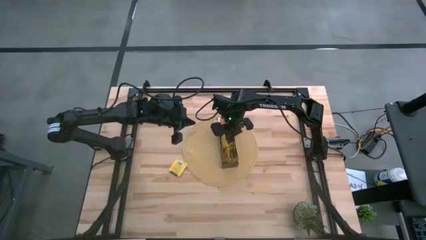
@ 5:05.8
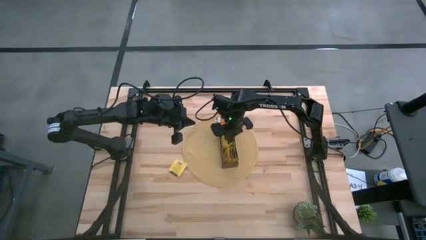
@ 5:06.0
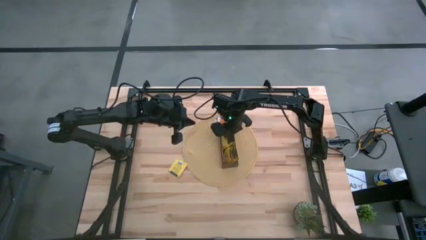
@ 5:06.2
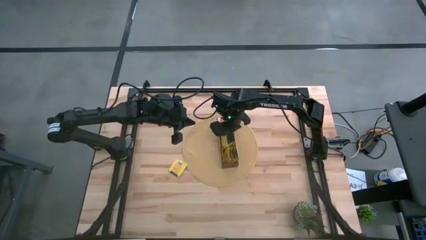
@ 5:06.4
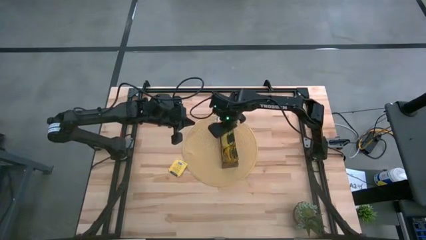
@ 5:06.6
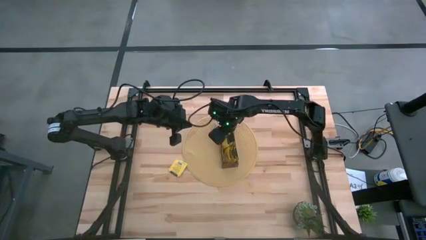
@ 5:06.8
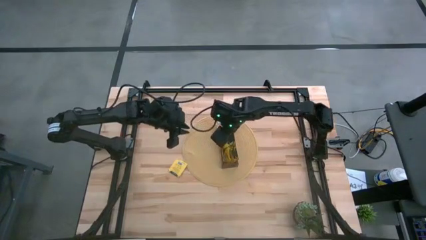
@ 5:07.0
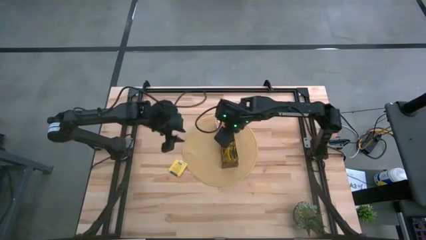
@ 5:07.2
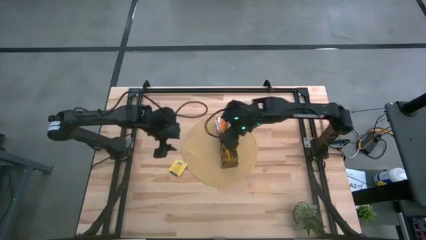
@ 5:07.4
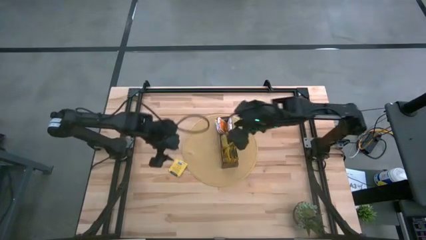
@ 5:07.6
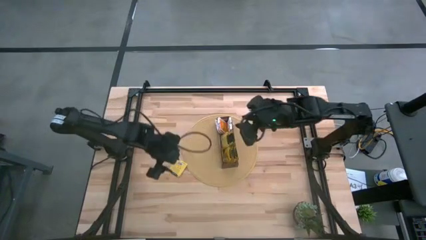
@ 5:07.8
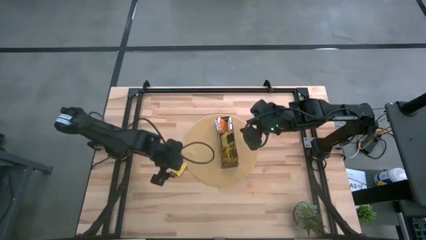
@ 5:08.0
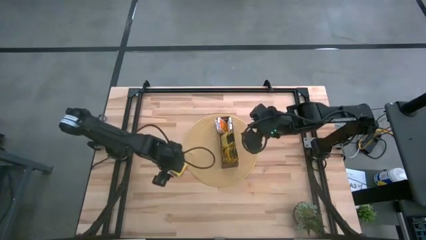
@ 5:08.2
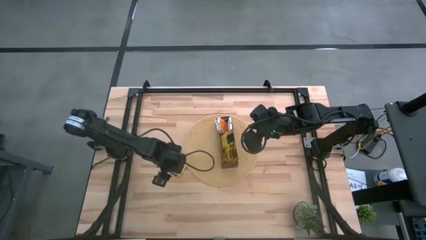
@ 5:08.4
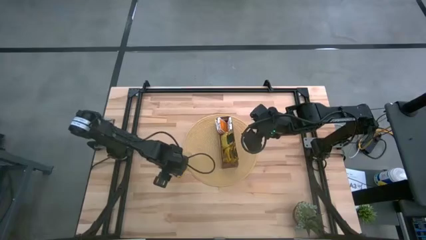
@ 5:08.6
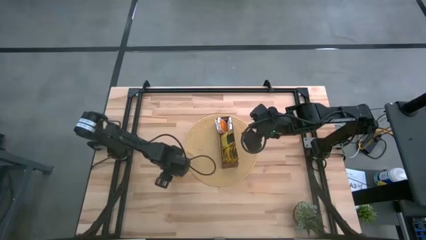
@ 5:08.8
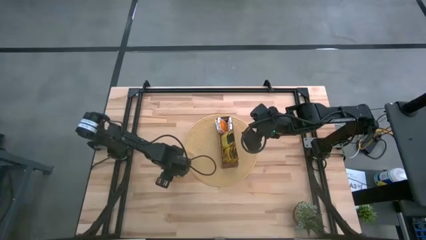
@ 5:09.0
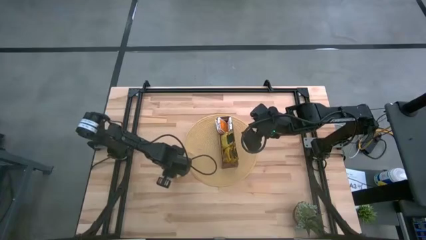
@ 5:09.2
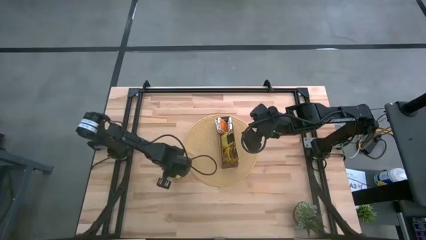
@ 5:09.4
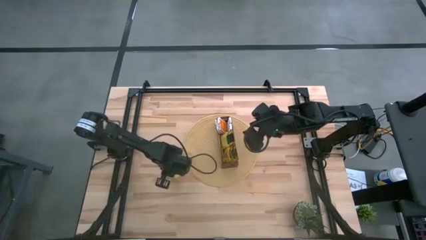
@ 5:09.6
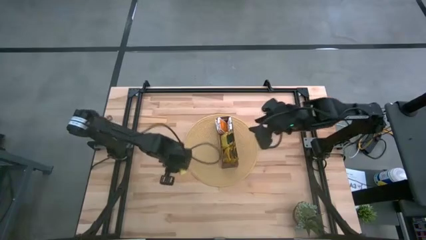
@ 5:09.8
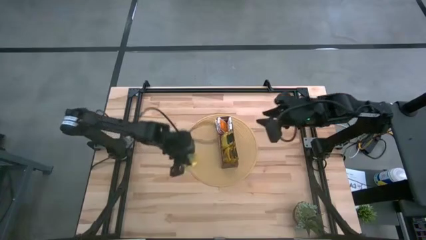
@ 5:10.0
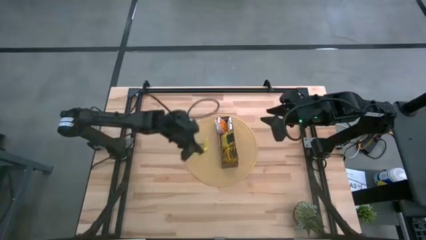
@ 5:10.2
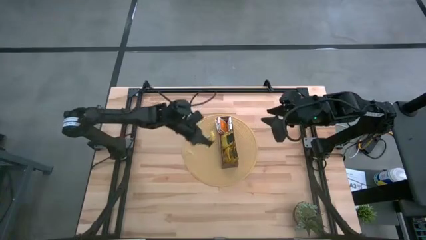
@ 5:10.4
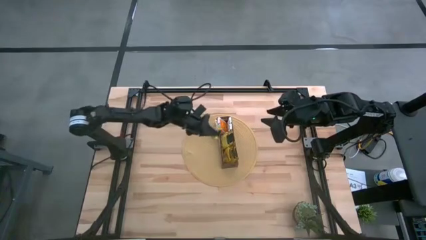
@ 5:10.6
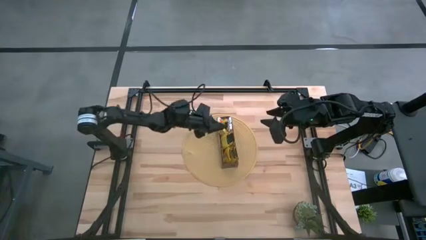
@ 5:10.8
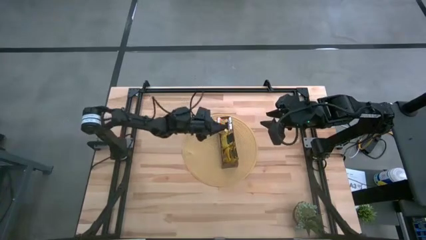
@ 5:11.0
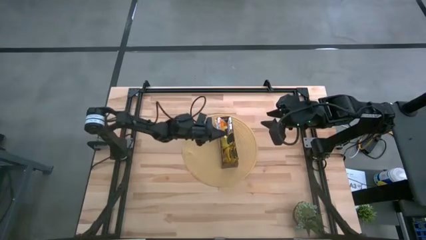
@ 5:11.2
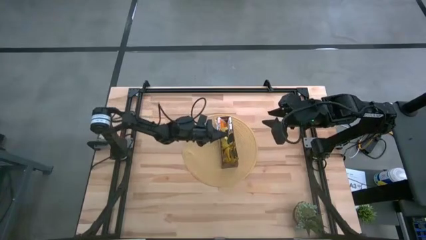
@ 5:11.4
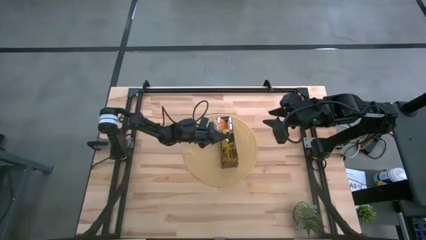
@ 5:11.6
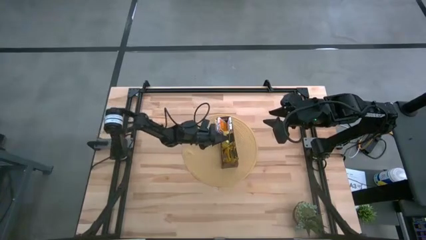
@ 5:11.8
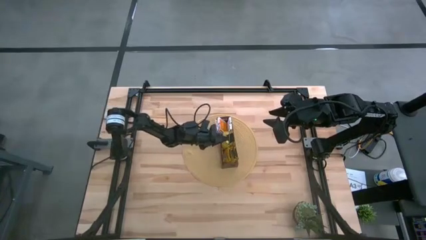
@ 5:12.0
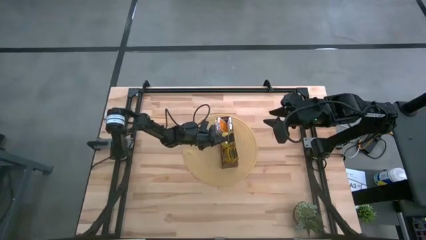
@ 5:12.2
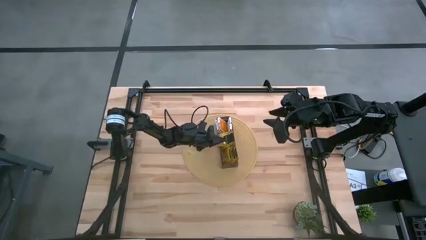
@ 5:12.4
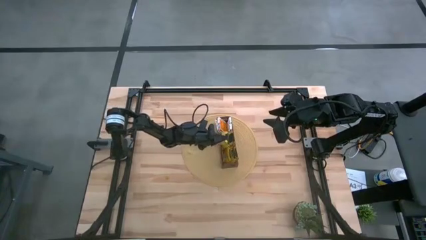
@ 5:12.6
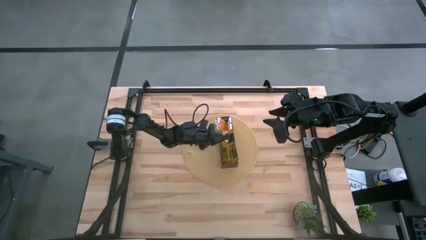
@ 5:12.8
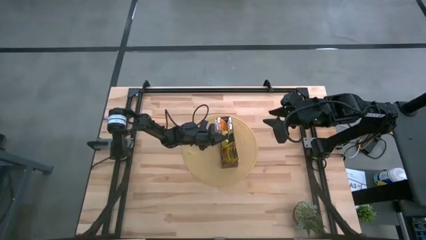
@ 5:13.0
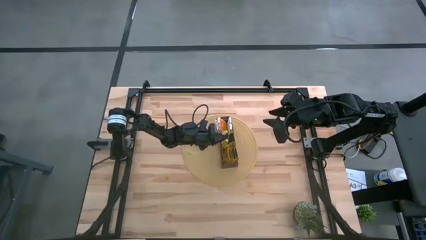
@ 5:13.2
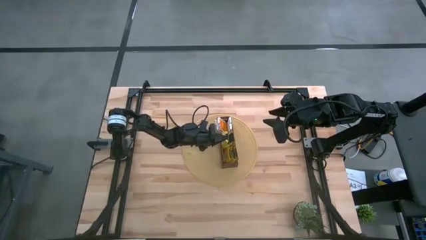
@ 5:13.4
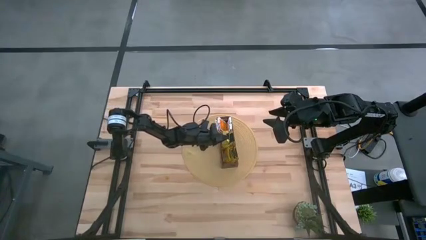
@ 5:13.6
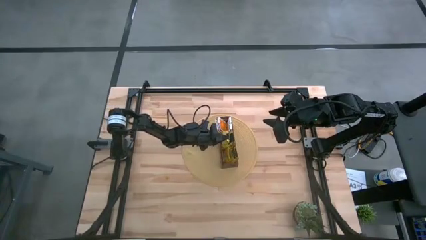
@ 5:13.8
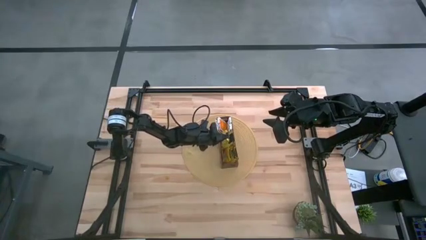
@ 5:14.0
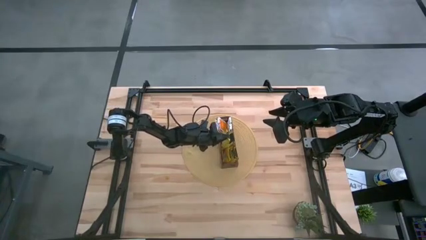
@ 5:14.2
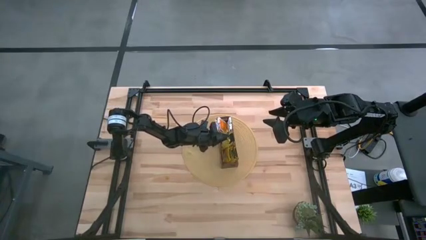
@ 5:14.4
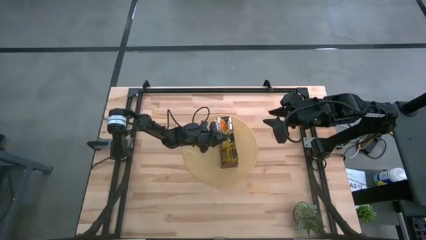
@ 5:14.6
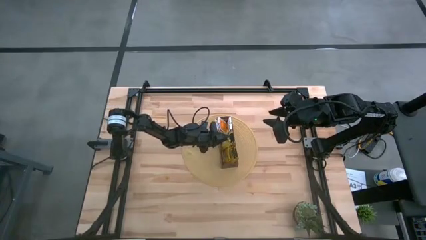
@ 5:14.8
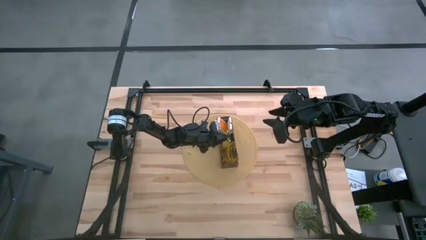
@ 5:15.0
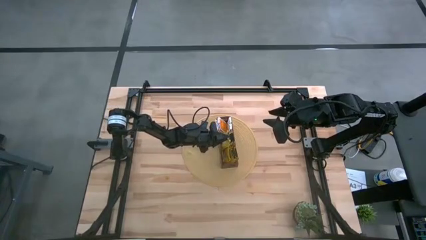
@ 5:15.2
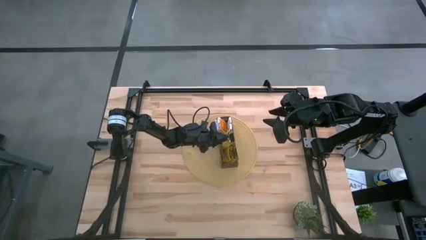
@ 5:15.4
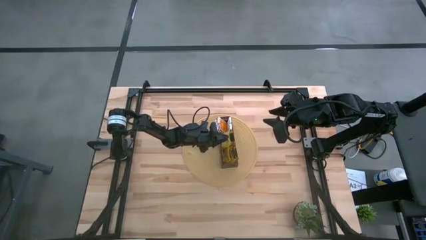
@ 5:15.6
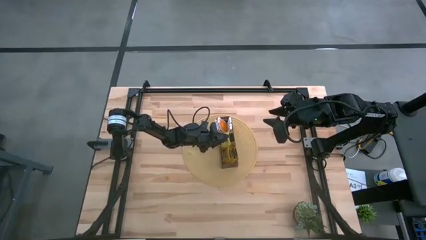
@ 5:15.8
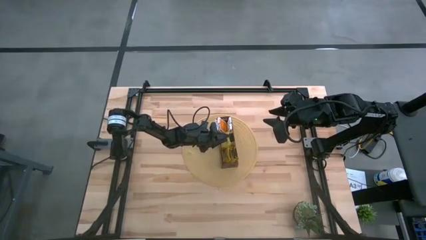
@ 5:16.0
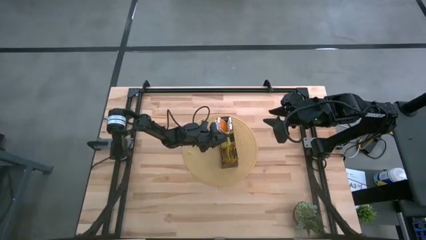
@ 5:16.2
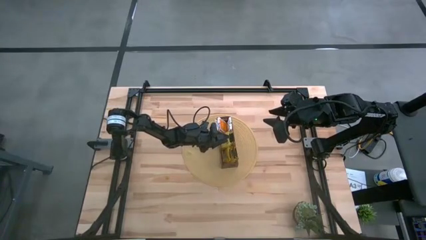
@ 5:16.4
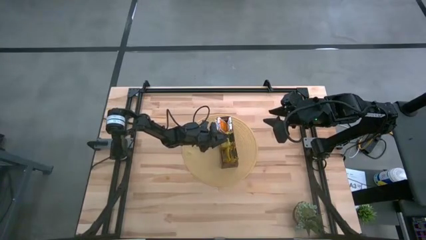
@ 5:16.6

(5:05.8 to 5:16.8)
Task: Pick & Place Tea
Put the yellow tea bag into the middle section of the wooden organizer

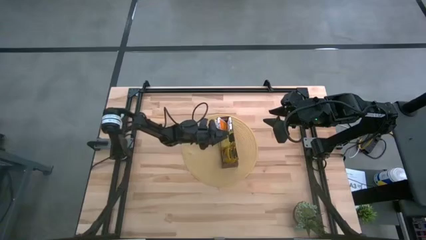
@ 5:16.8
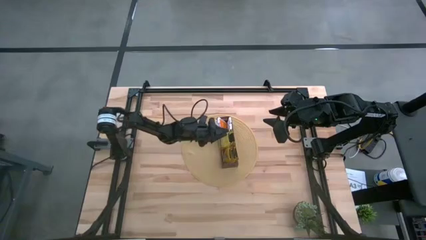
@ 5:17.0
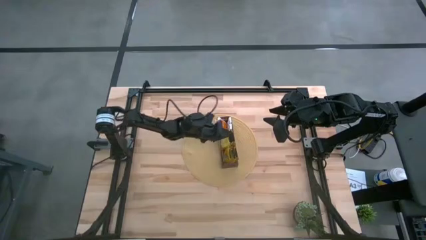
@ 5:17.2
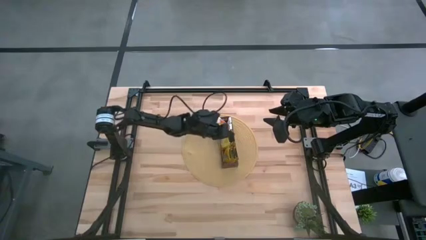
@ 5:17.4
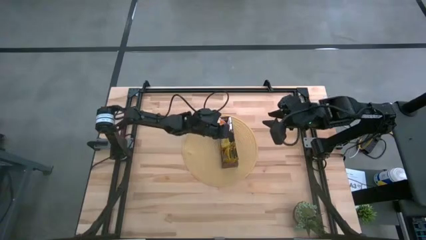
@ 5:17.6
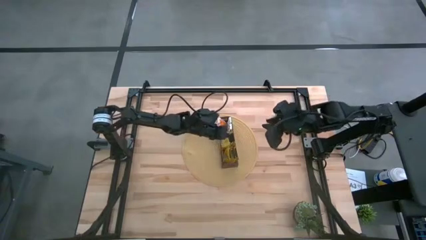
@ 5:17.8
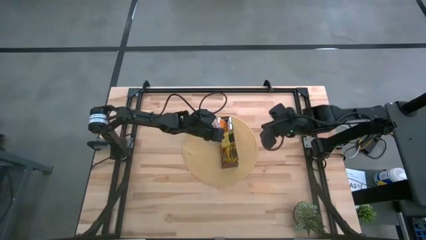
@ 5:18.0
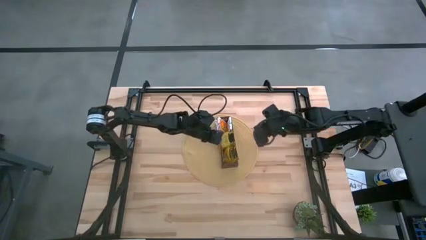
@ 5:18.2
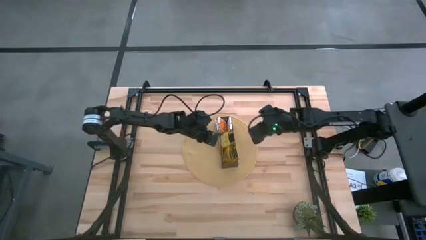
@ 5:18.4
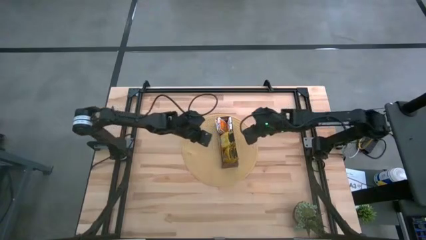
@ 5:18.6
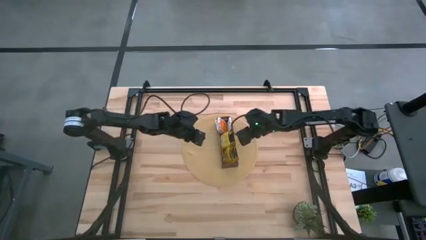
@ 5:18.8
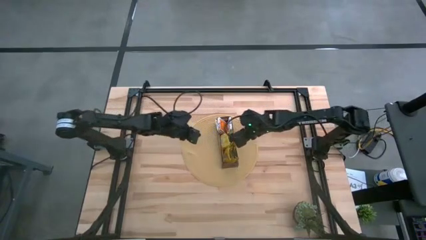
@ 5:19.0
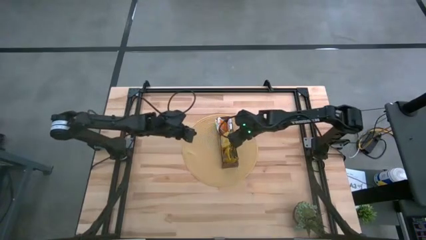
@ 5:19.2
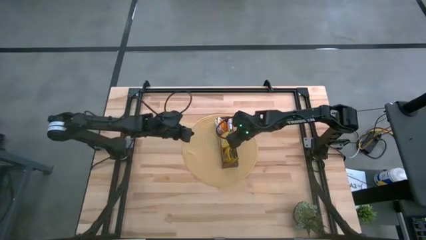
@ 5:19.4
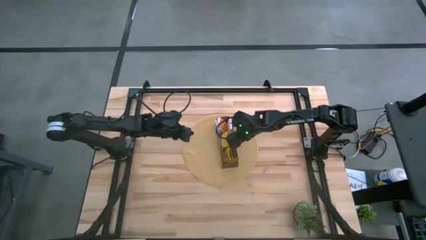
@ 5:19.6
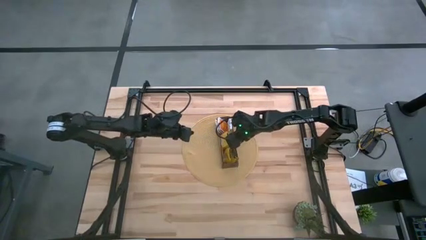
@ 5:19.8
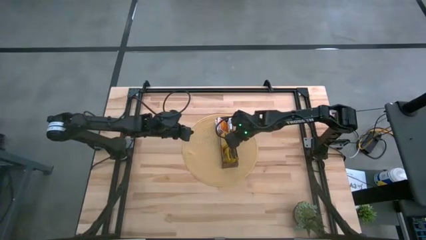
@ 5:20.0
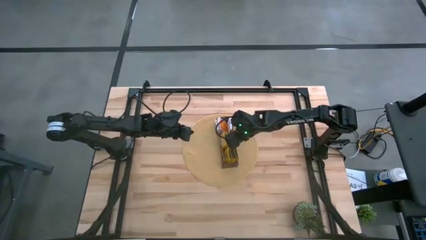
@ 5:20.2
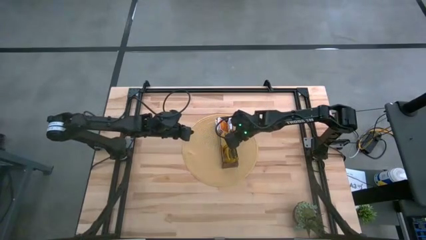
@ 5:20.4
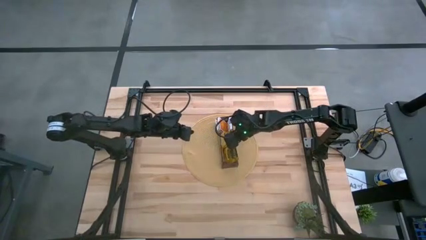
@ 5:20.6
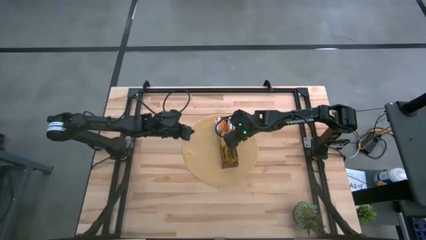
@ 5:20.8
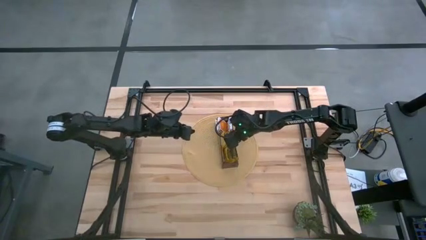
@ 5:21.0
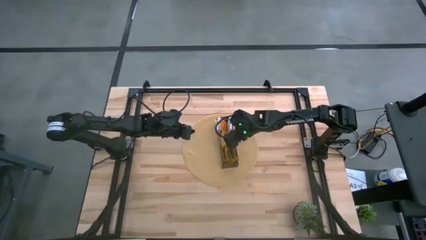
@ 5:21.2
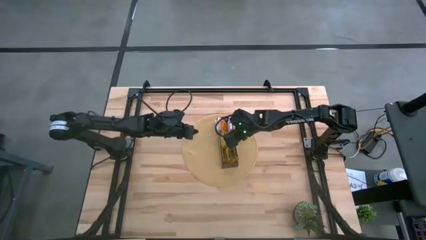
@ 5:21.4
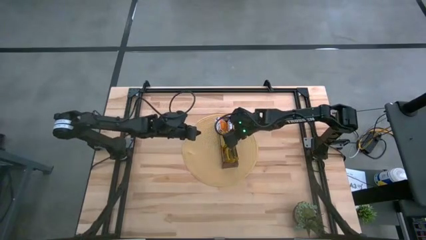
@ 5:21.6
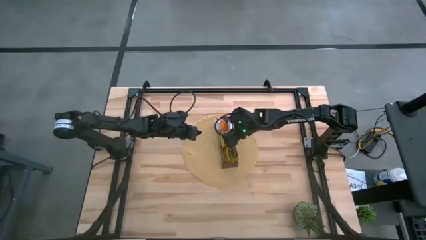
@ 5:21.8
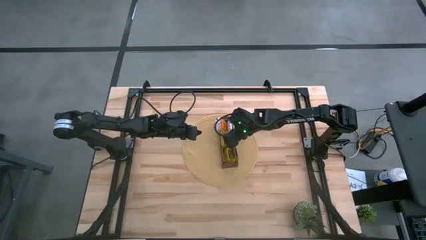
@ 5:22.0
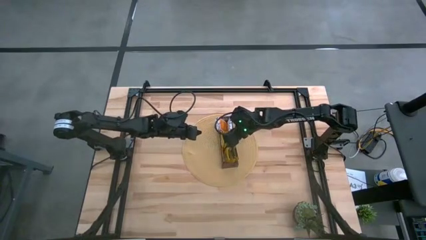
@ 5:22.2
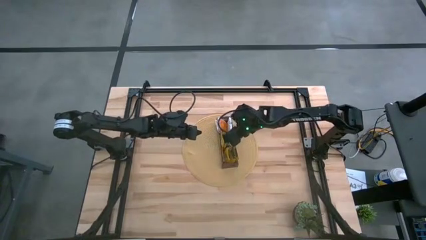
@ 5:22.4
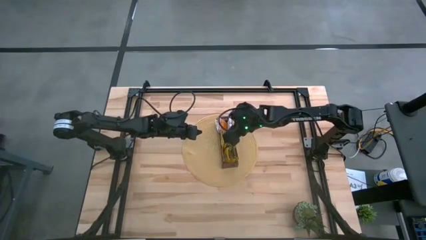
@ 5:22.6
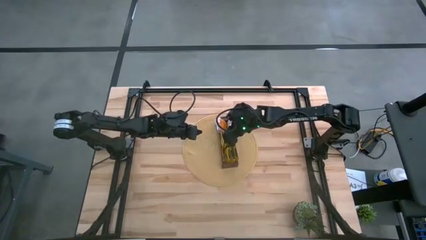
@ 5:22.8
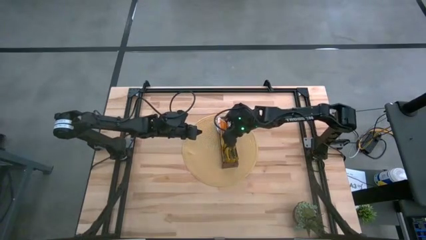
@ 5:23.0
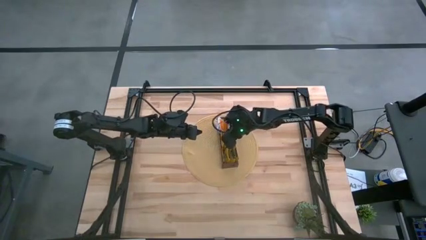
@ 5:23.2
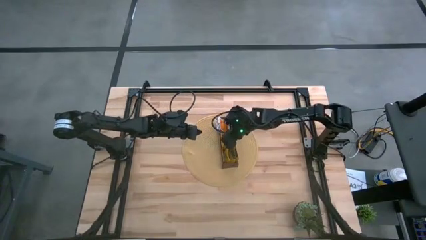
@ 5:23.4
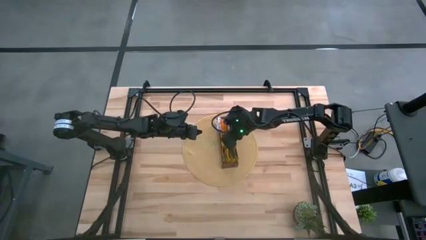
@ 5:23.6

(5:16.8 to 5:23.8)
Adjust the yellow tea bags in the wooden organizer
